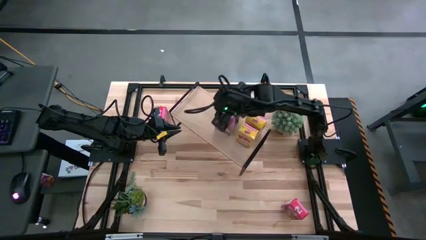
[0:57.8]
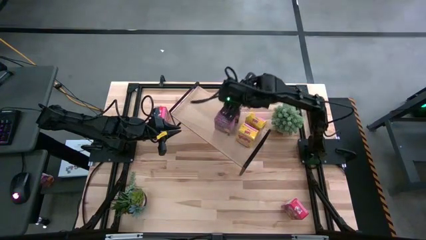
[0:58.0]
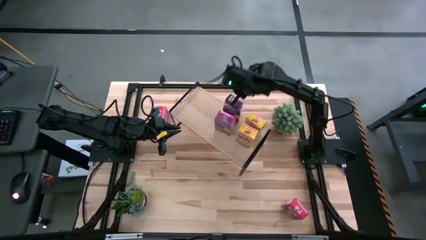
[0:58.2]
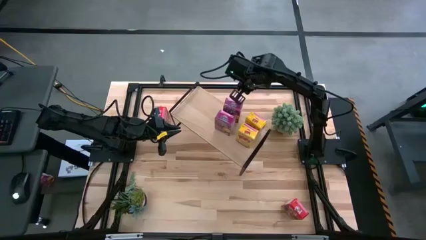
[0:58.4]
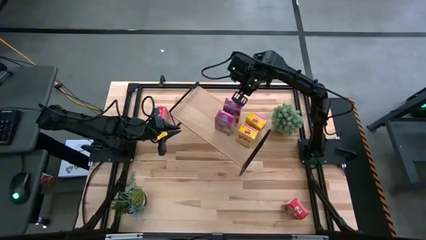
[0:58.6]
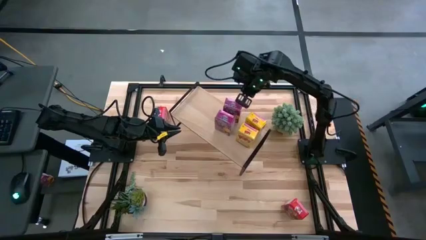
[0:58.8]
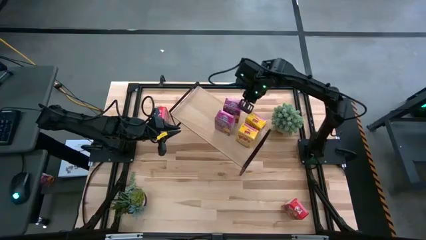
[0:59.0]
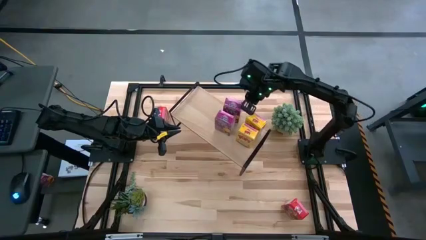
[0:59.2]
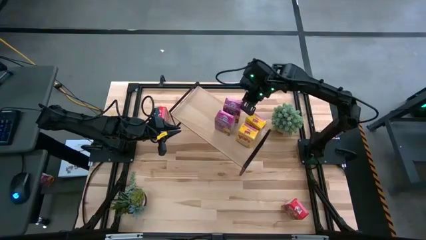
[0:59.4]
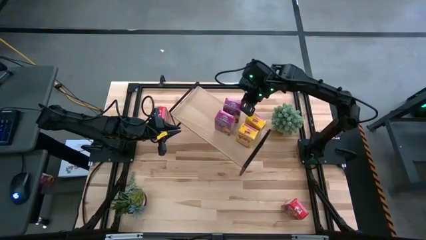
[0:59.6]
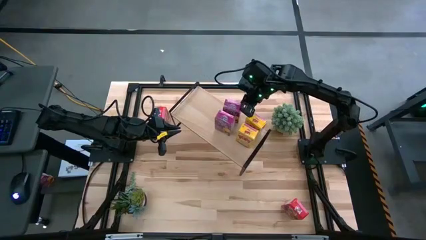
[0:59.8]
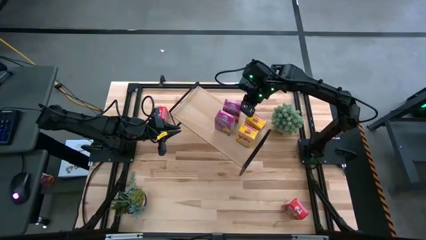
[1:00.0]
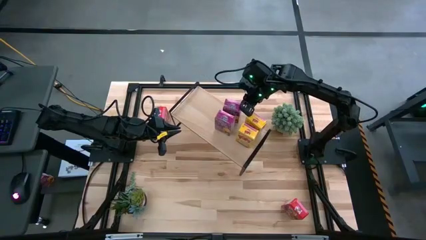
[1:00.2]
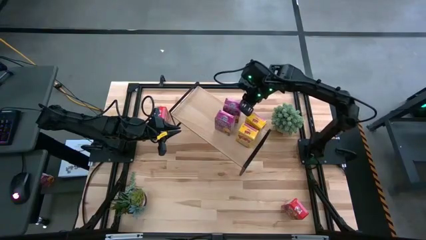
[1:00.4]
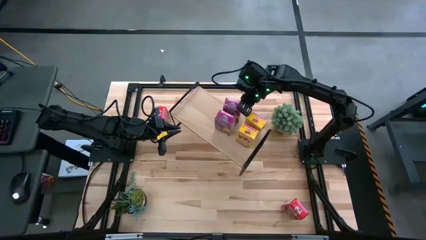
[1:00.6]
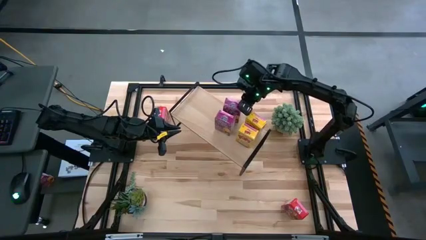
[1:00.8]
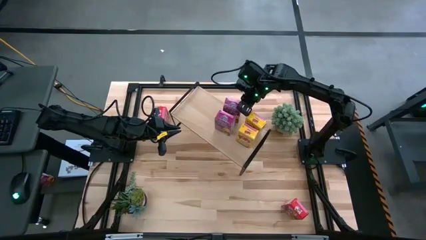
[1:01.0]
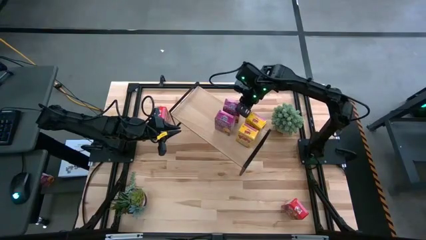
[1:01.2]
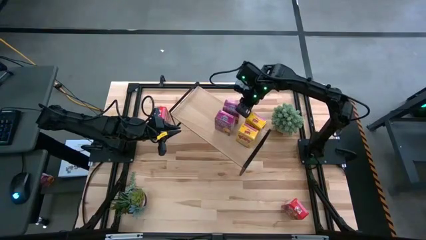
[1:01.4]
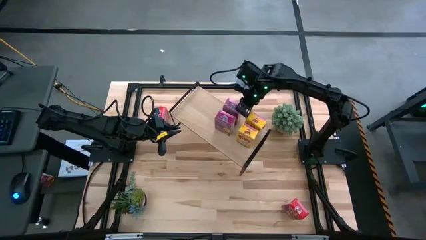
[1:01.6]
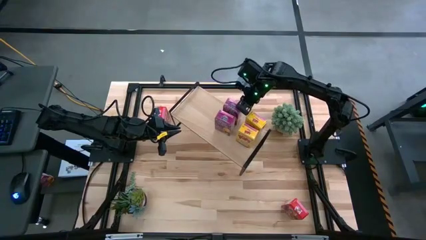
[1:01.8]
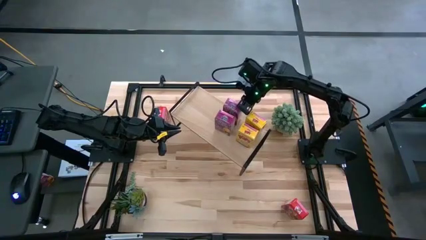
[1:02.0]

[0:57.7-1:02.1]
Task: Stack cereal on shelf
Adjust the violet cereal

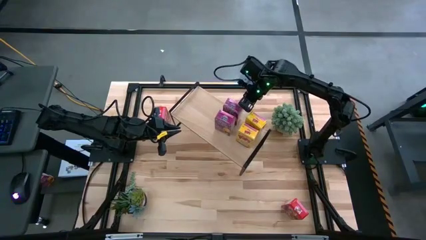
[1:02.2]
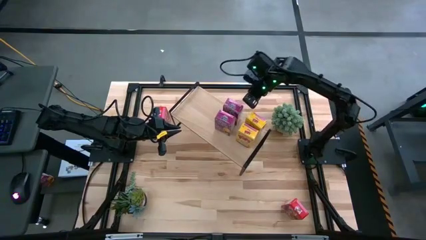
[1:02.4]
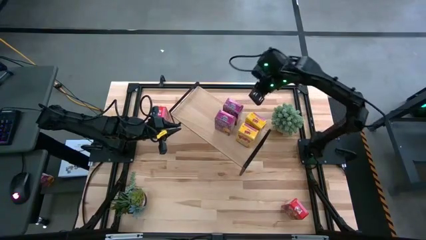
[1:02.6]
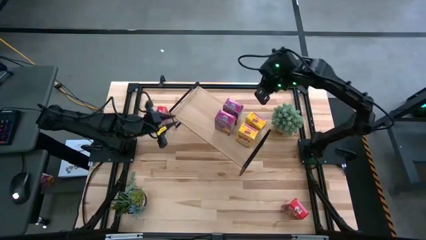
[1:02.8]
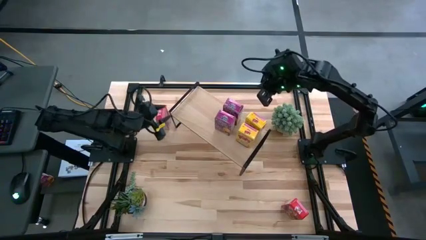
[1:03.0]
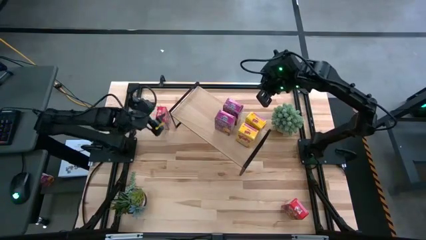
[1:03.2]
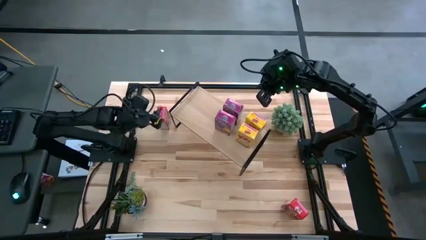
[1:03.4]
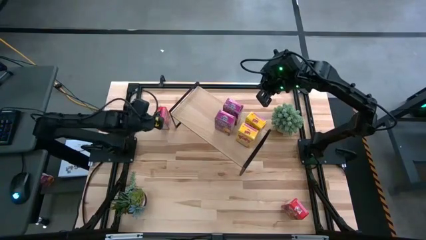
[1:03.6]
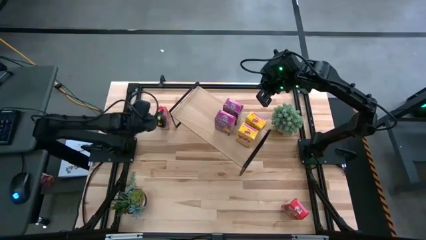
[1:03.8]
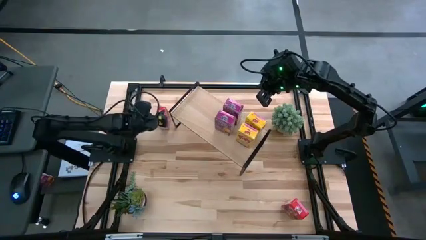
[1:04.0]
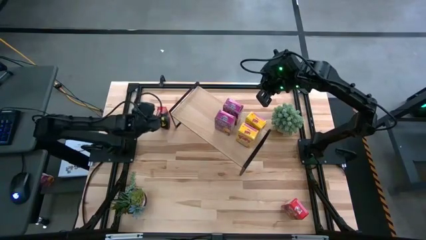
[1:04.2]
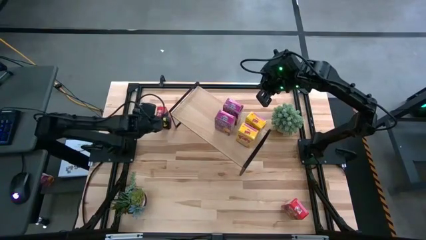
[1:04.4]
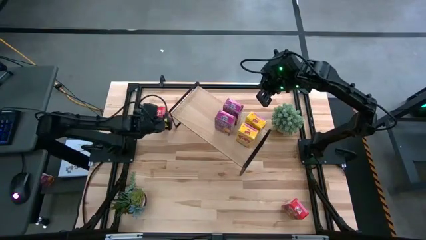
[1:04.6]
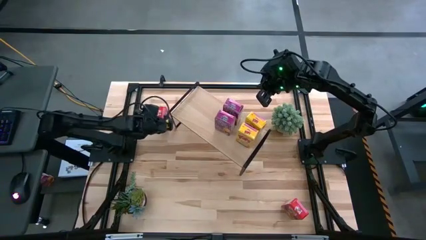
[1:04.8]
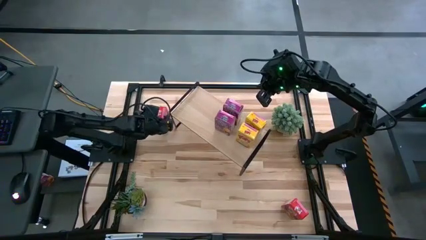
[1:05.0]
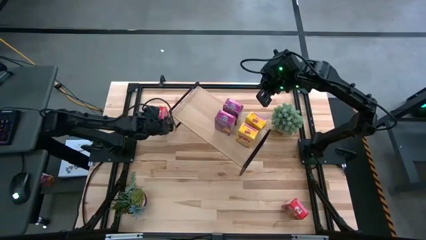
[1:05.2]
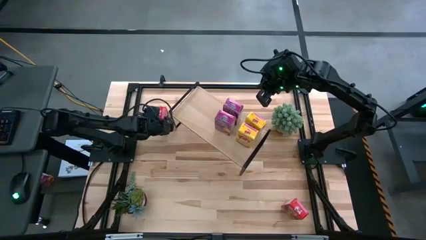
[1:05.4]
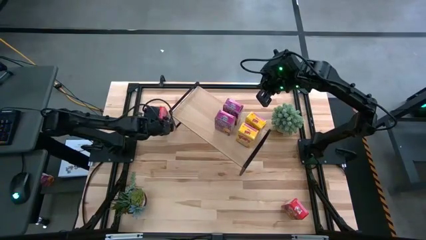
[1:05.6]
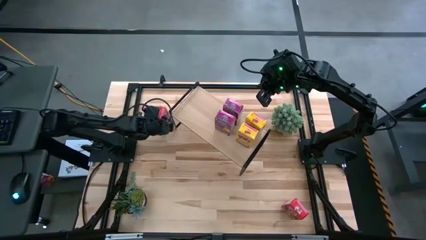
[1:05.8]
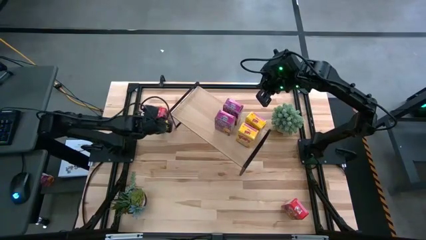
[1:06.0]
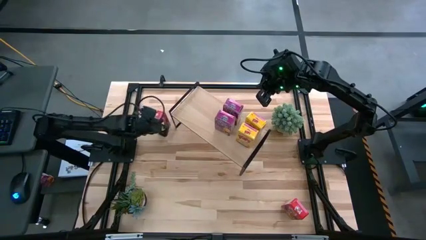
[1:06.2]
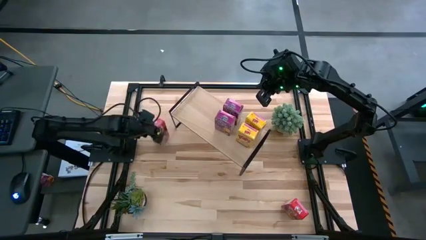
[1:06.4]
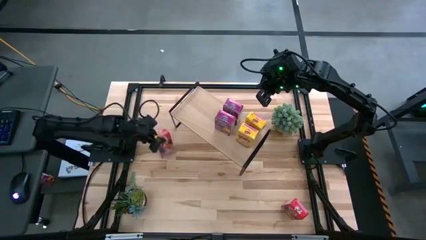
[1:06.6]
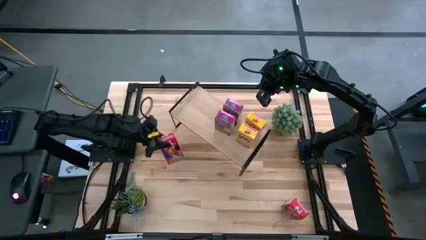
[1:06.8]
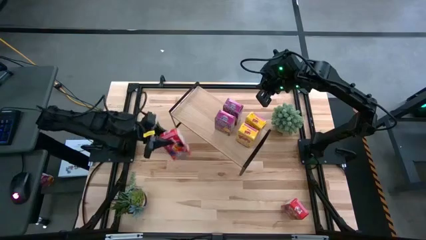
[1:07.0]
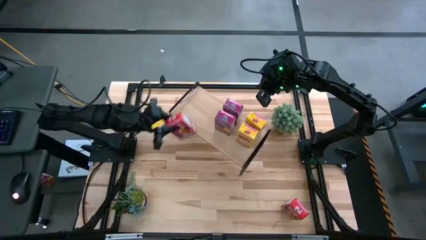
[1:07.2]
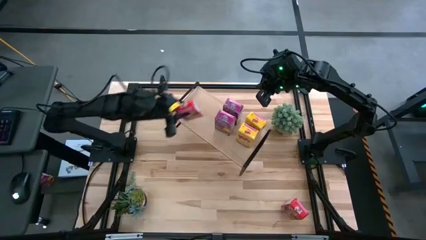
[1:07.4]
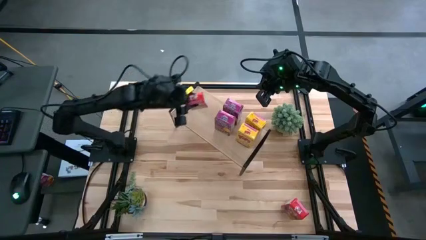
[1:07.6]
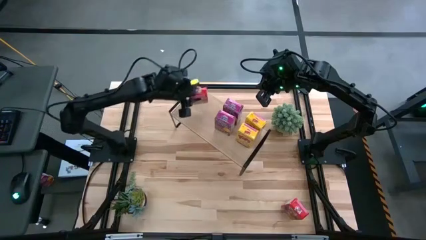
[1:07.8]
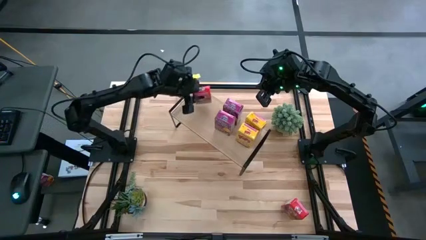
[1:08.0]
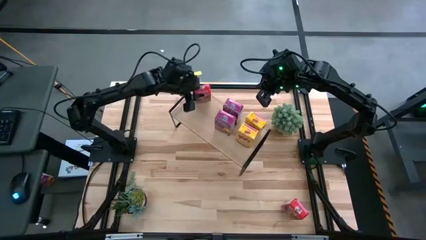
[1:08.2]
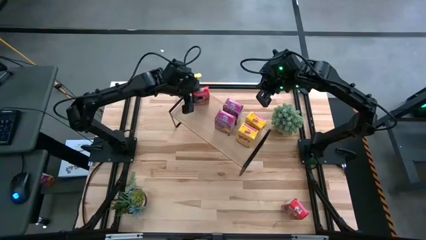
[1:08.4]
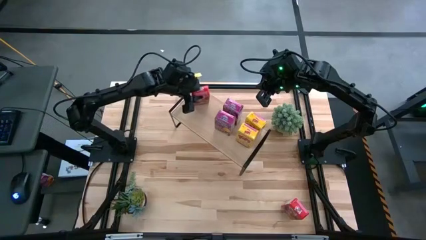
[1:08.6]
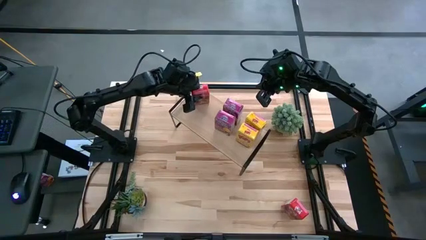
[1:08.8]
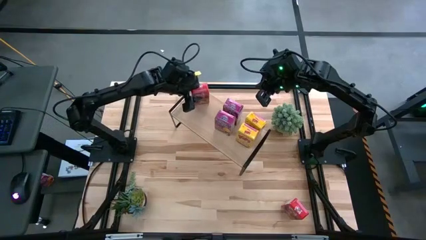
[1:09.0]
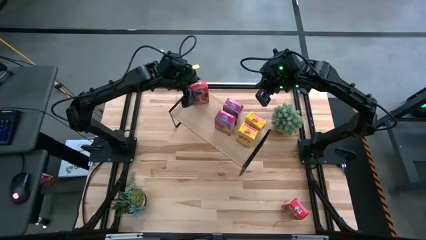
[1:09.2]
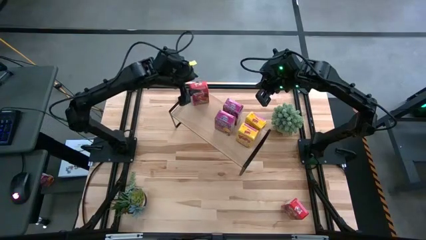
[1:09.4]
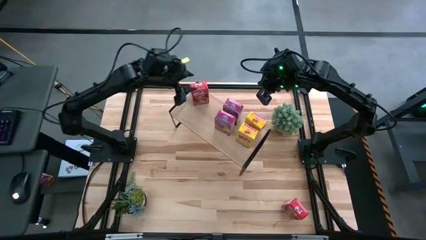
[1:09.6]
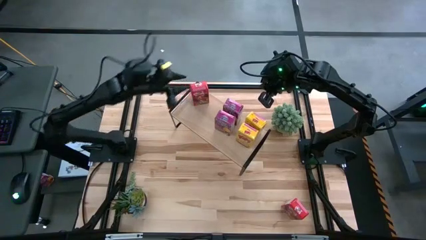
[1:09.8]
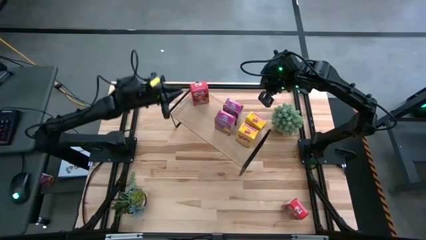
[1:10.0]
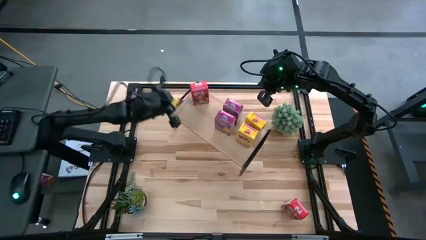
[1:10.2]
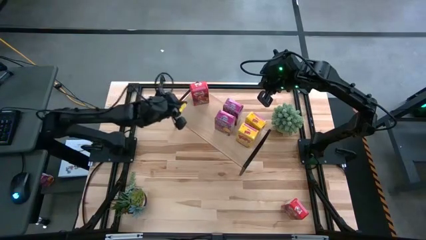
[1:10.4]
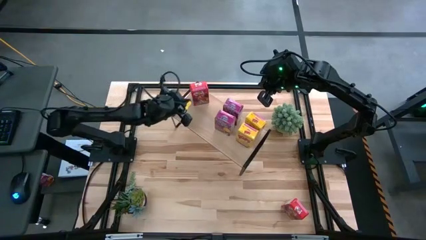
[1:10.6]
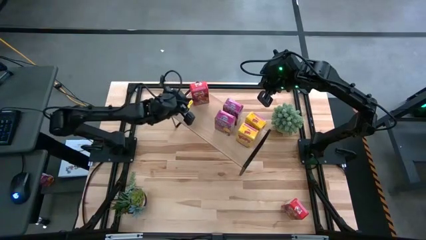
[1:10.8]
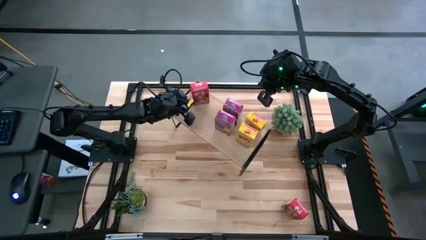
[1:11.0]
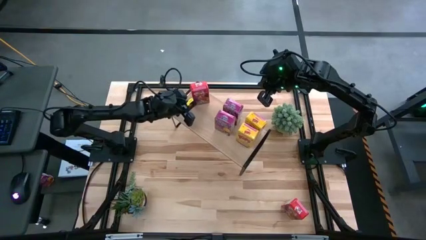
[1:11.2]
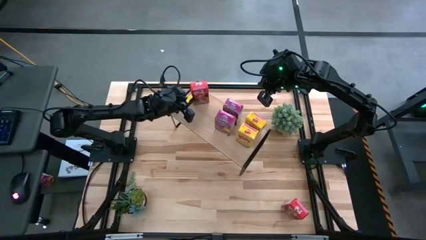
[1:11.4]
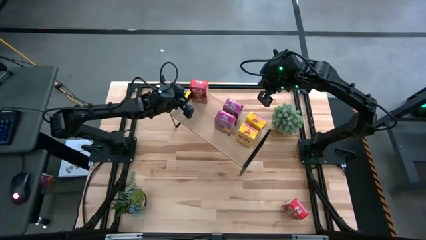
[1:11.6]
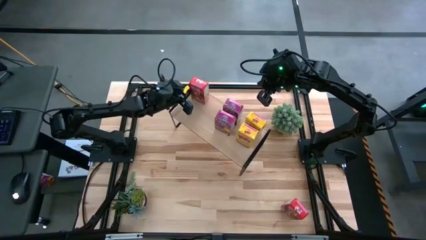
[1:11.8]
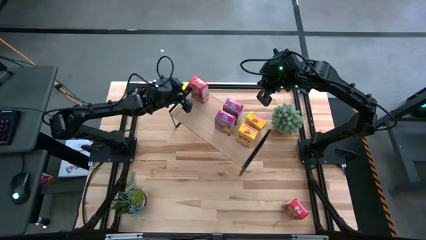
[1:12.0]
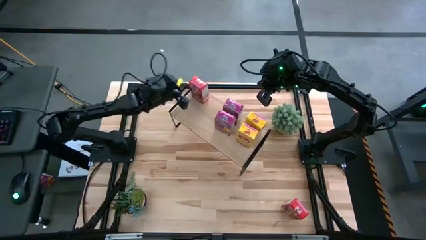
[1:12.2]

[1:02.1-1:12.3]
Put the top red cereal box on the shelf

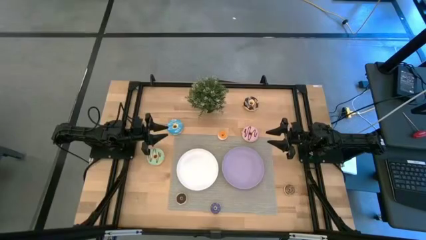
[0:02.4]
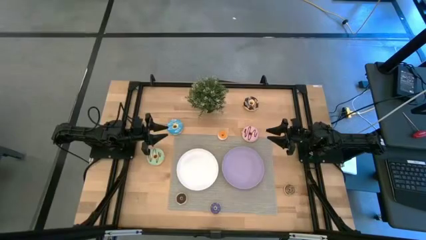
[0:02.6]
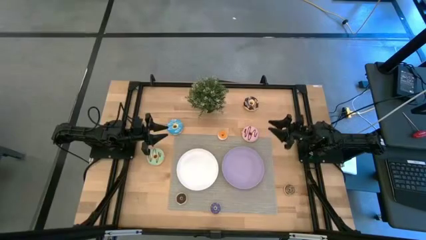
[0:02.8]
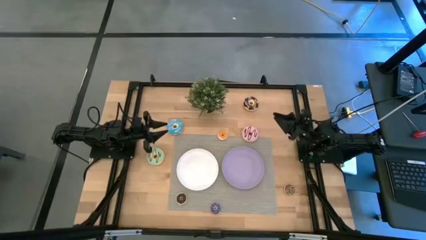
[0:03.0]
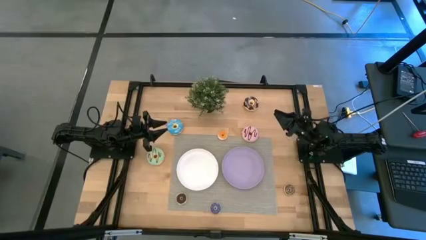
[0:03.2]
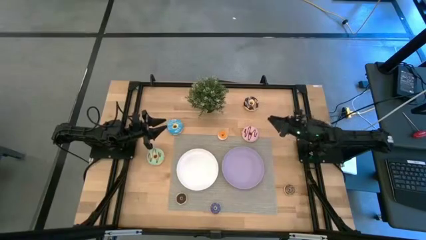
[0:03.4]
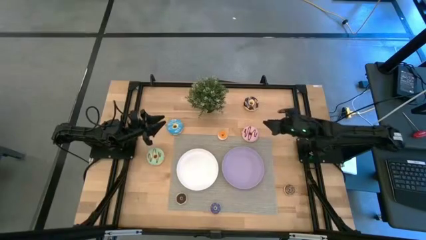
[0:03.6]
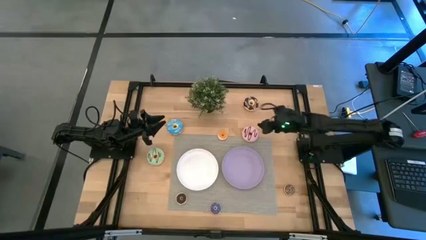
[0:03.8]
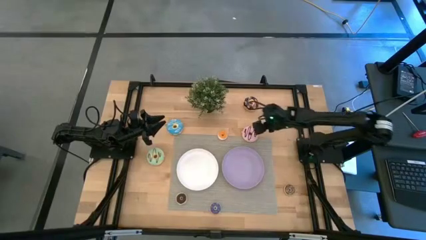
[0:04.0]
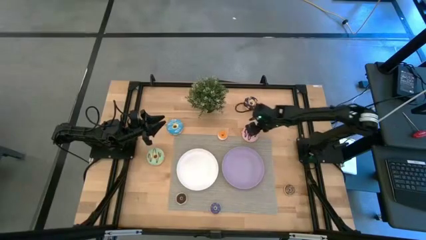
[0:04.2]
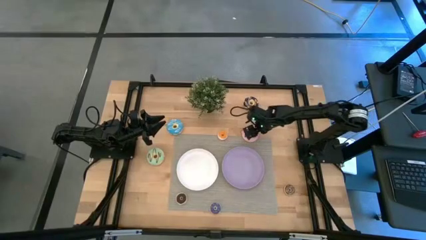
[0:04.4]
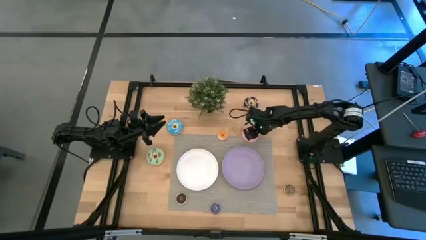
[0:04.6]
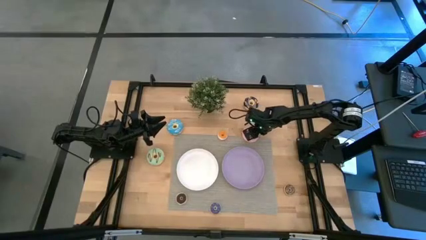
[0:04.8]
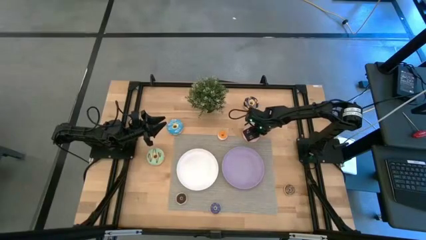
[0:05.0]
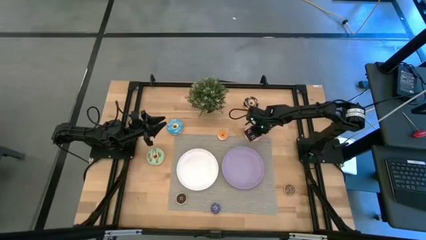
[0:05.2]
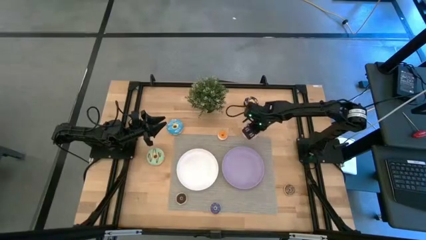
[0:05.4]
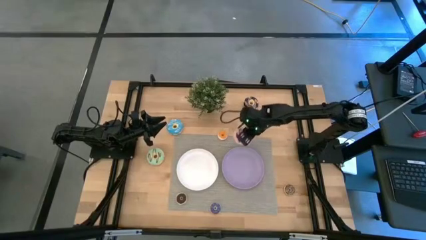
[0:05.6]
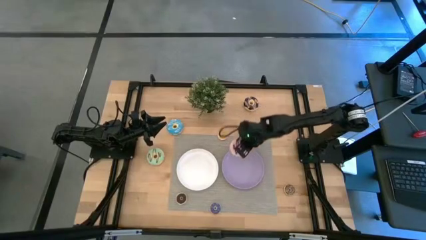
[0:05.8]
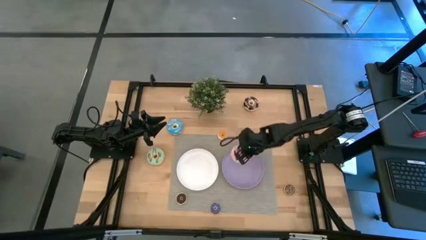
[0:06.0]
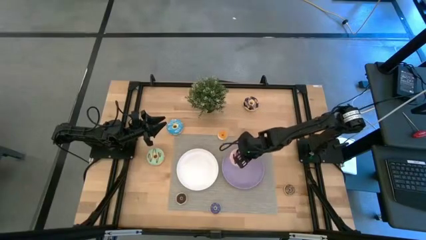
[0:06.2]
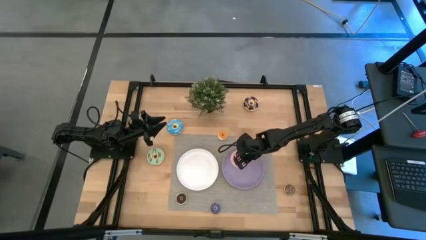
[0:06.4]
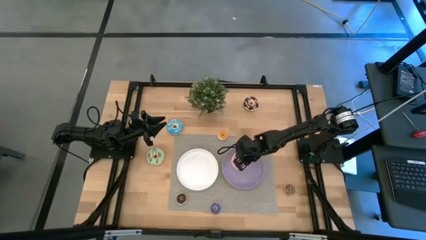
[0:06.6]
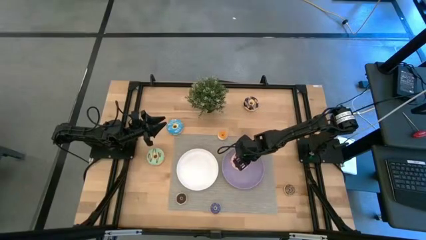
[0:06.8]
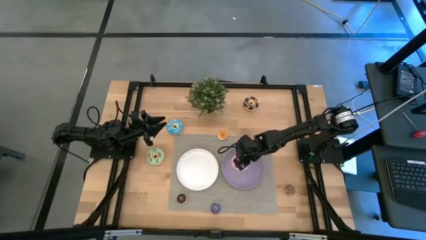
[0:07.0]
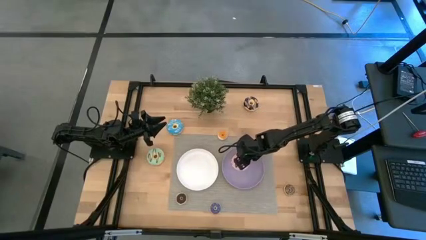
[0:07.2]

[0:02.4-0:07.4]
Task: Pick & Place donuts
Put the big pink donut on the purple plate
